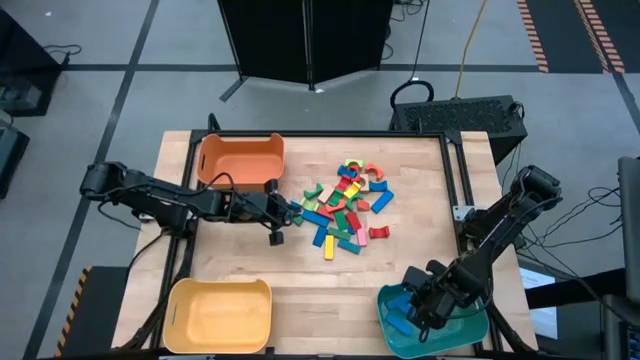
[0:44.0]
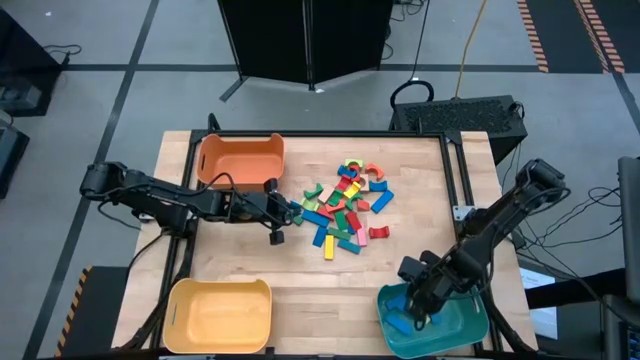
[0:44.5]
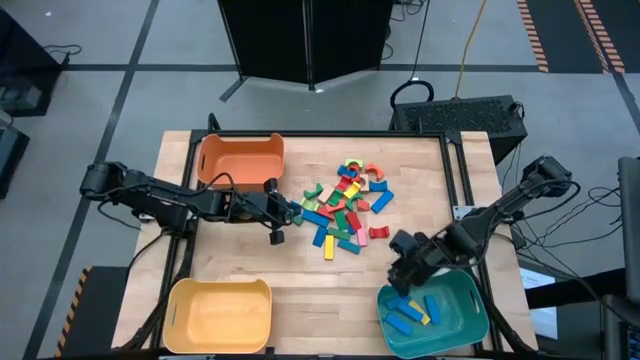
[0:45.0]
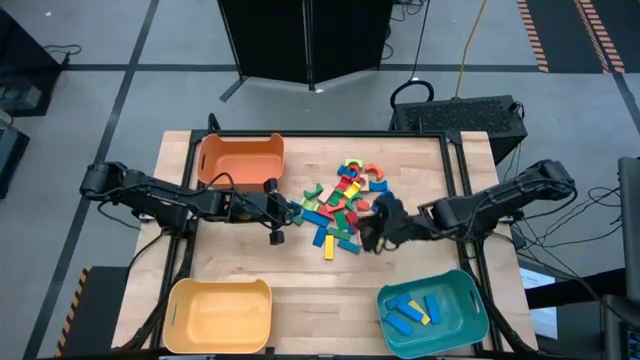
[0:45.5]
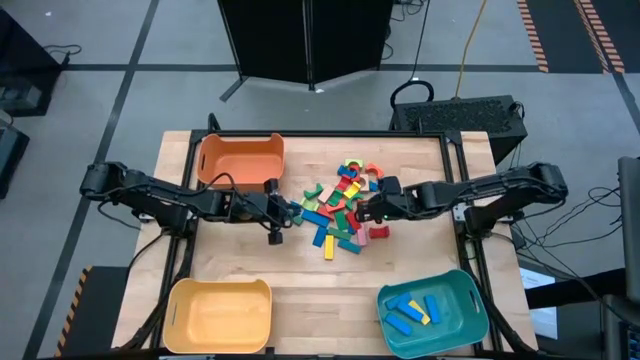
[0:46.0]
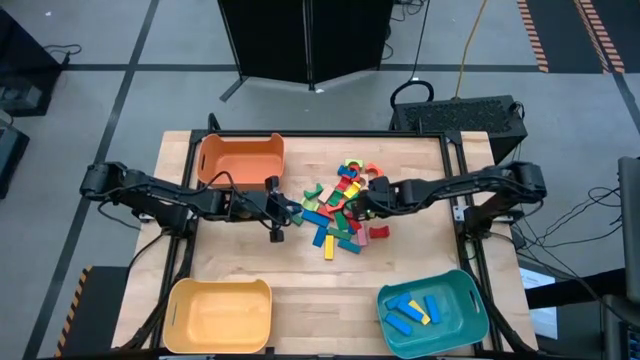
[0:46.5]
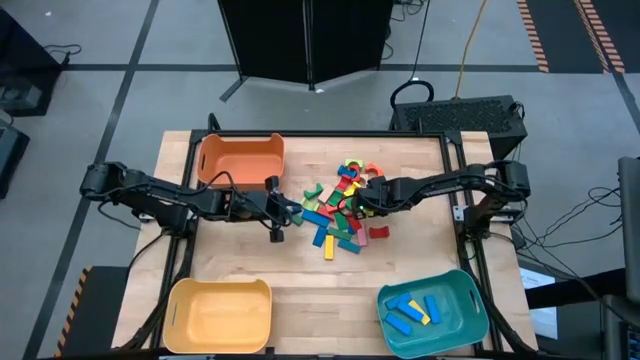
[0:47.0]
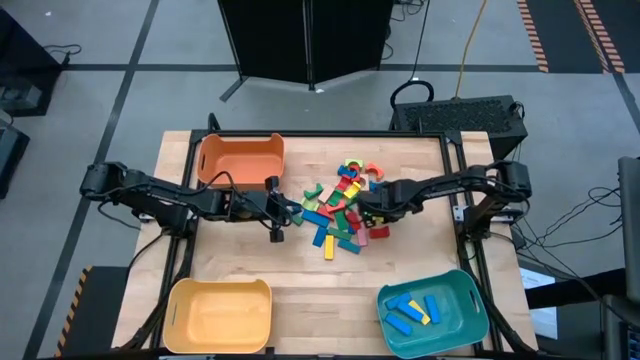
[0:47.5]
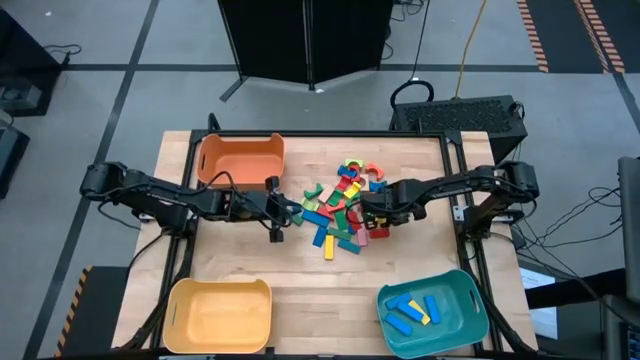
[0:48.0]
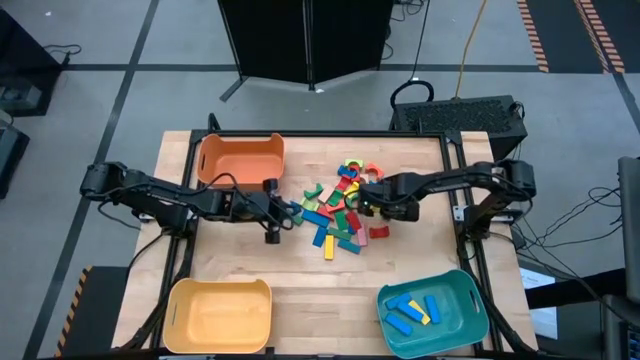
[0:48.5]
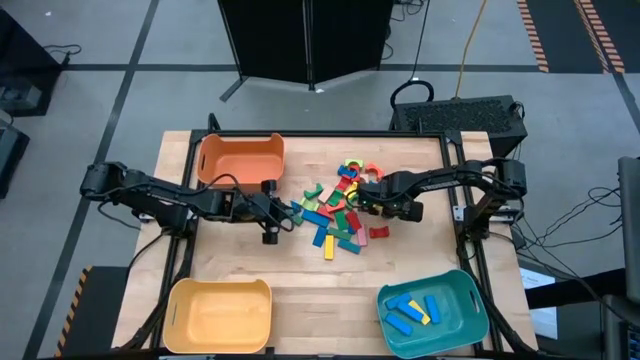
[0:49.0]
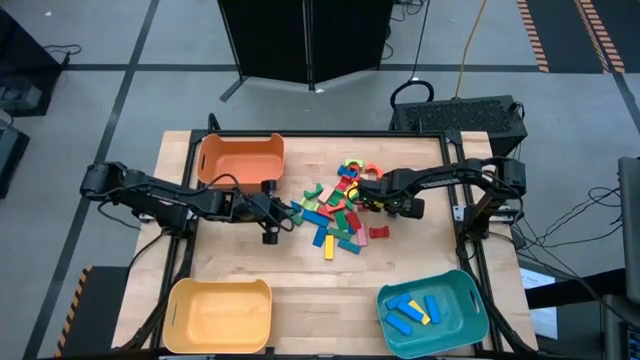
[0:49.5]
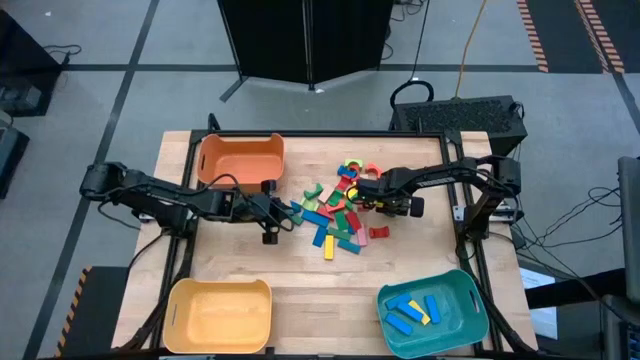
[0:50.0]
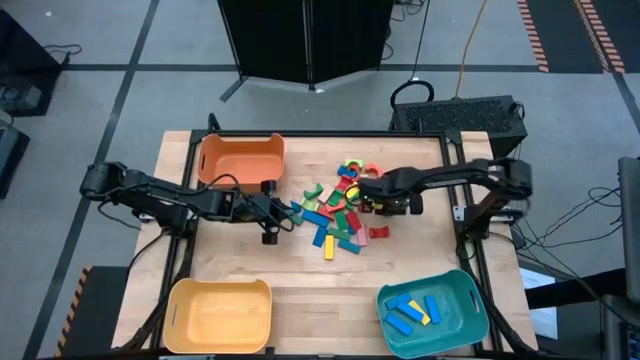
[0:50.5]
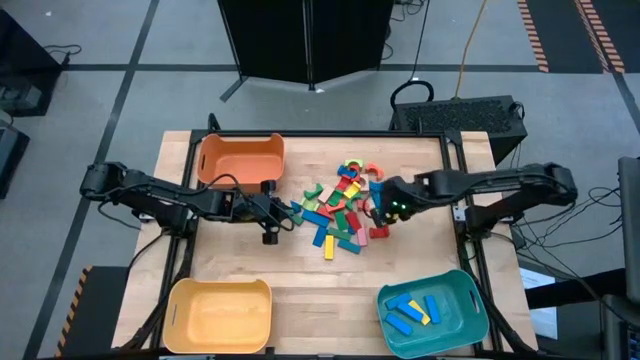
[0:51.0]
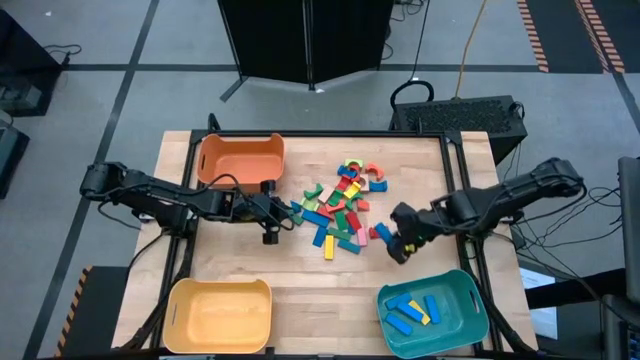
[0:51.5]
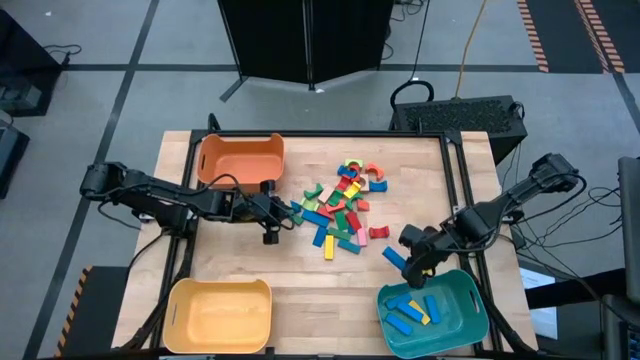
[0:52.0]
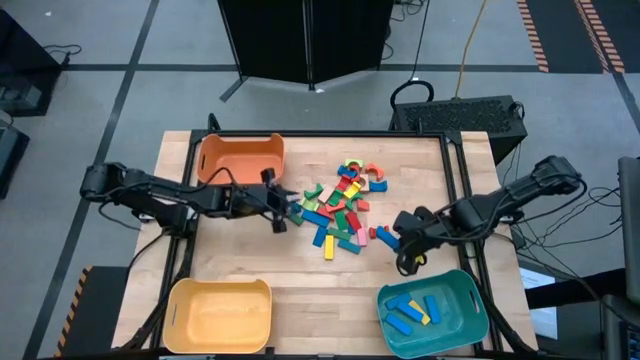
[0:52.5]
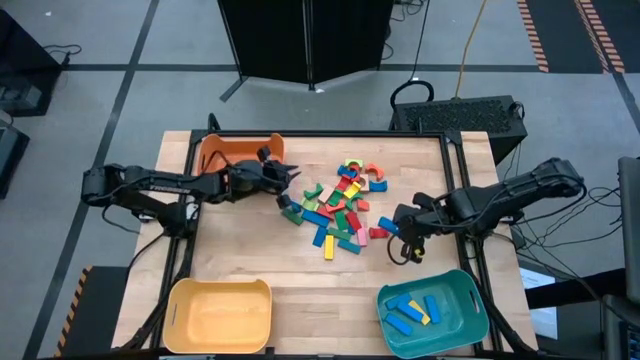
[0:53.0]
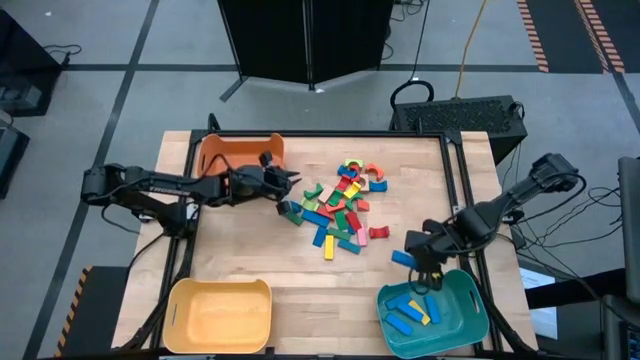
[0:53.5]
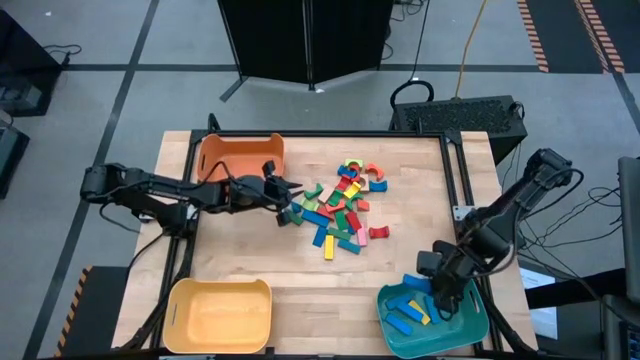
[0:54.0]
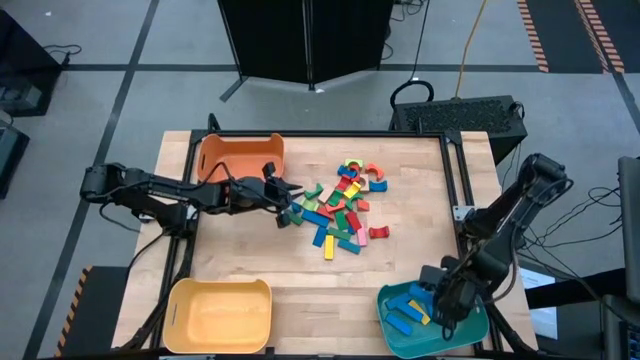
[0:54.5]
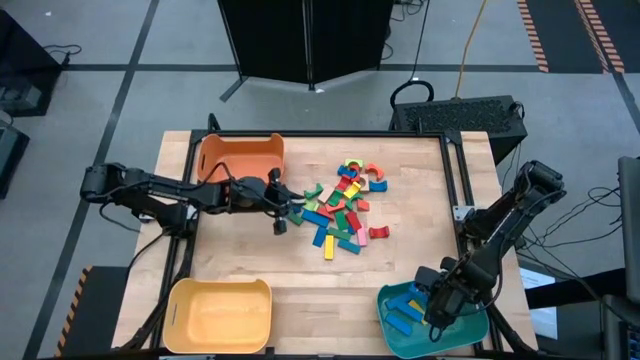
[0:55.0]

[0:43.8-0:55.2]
Task: Sort blocks by size
Put the blue rectangular block into the blue bin

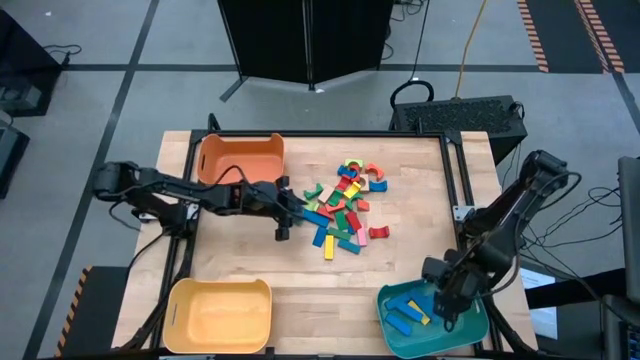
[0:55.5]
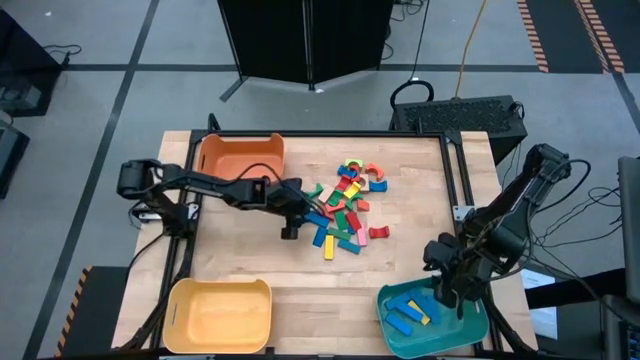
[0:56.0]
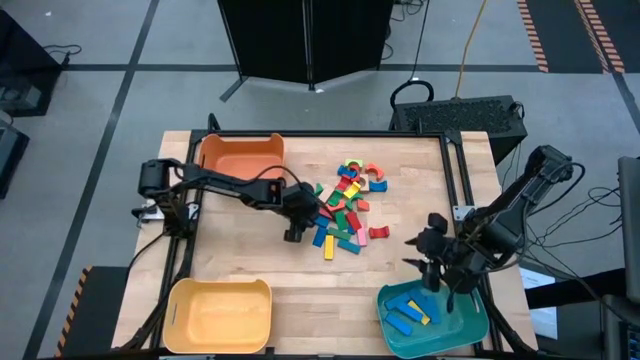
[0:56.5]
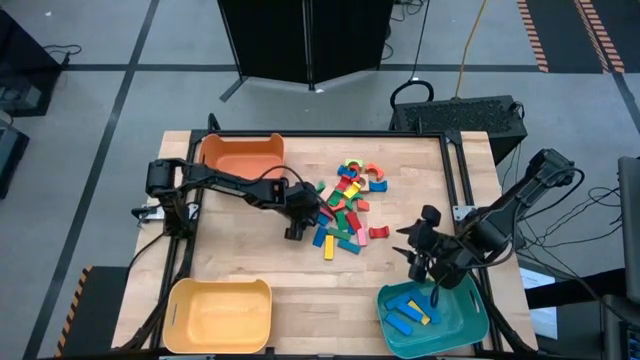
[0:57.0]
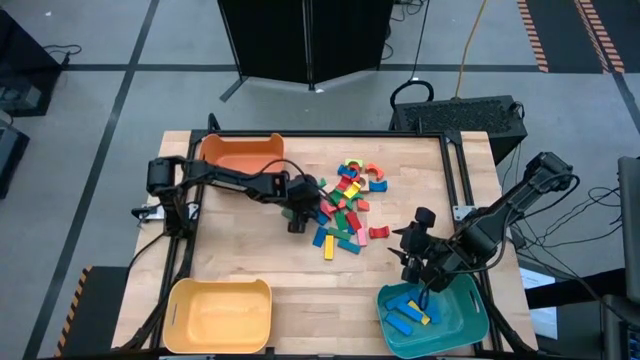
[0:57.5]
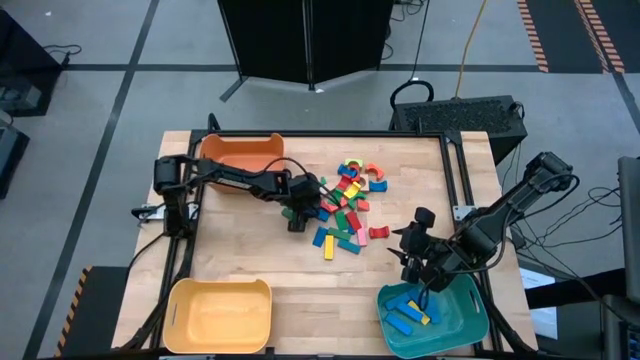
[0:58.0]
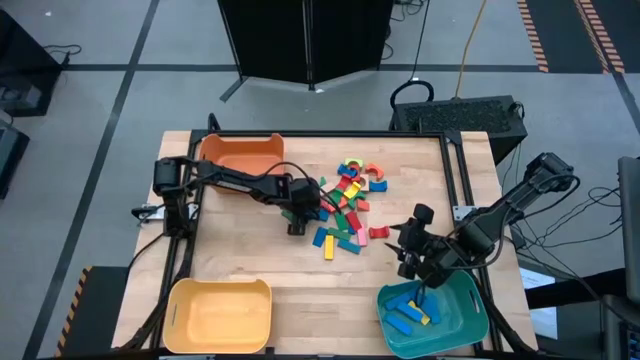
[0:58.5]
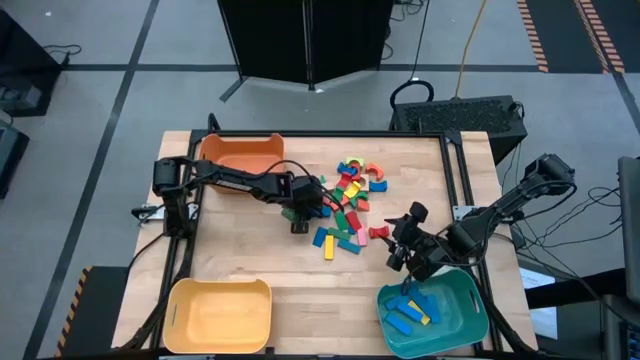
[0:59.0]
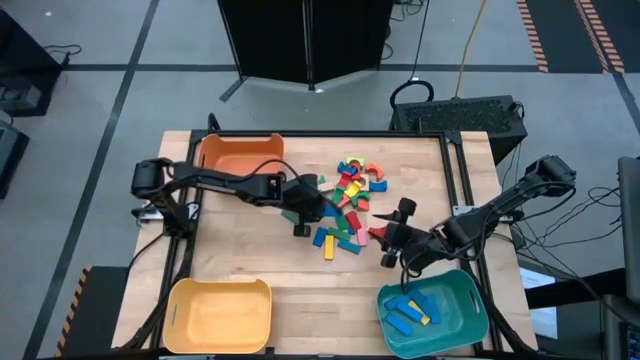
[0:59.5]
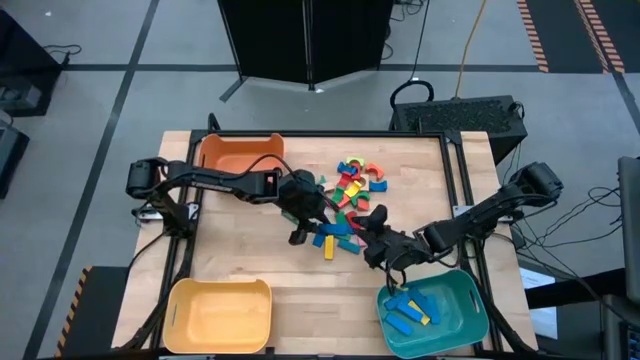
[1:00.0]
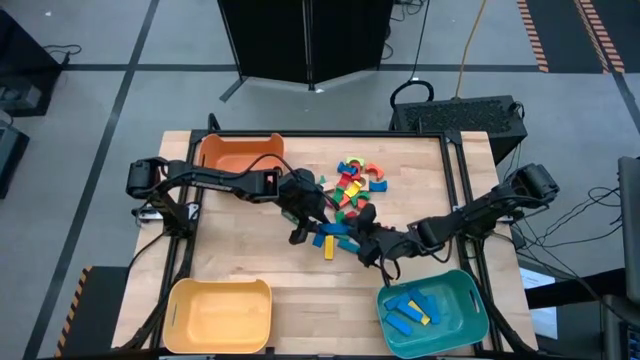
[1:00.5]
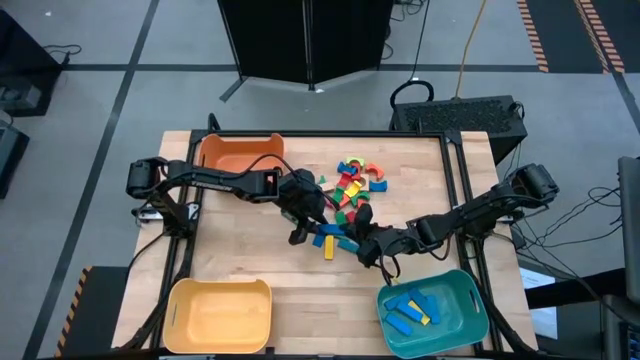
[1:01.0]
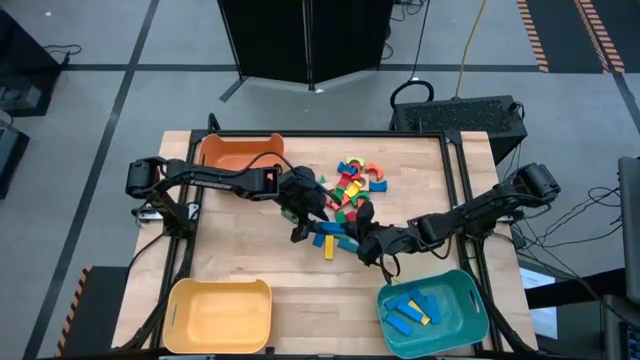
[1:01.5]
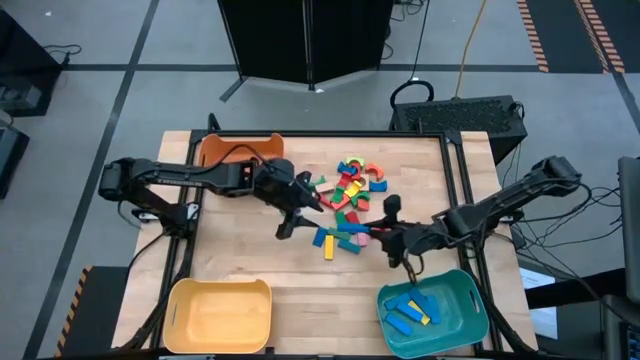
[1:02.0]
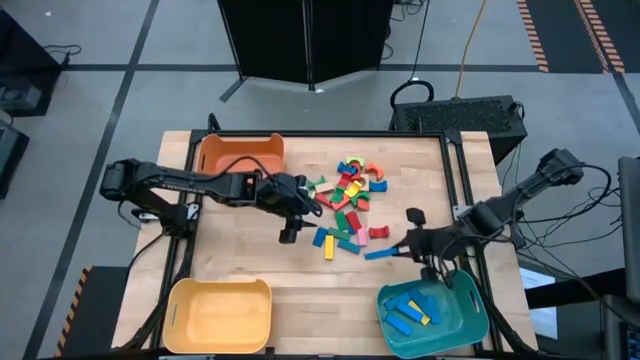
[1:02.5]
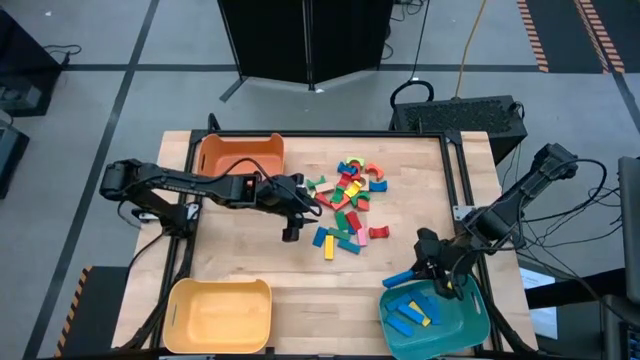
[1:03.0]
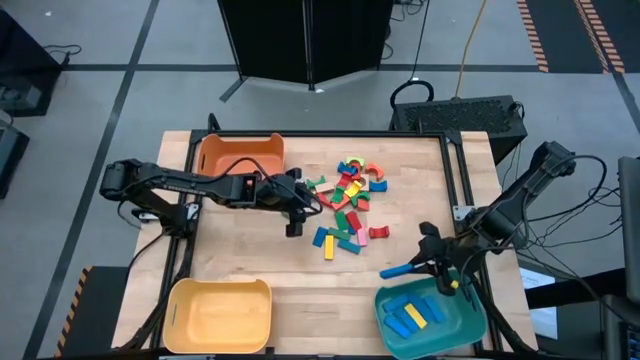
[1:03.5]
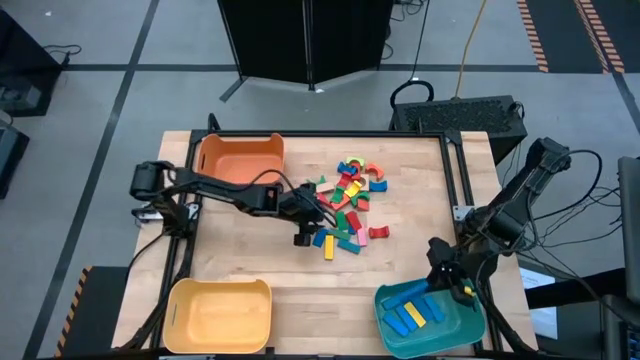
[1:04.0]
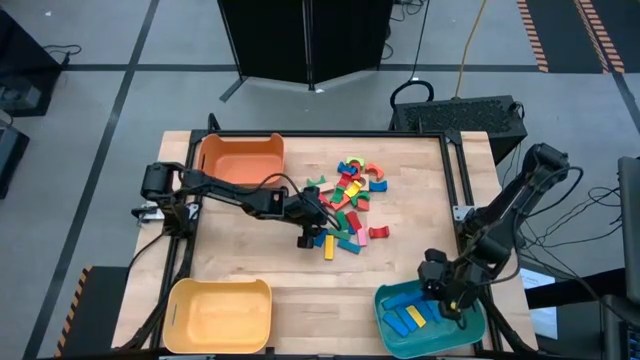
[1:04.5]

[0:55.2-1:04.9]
Put the blue rectangular block into the blue bin

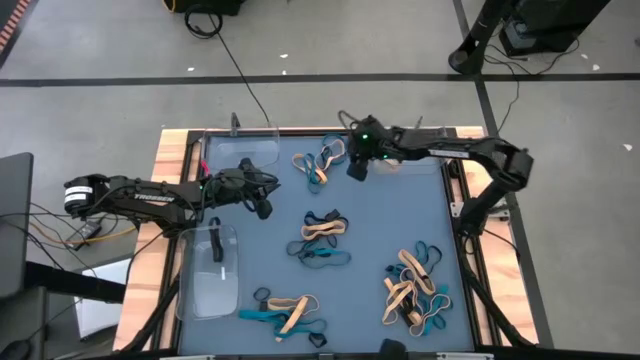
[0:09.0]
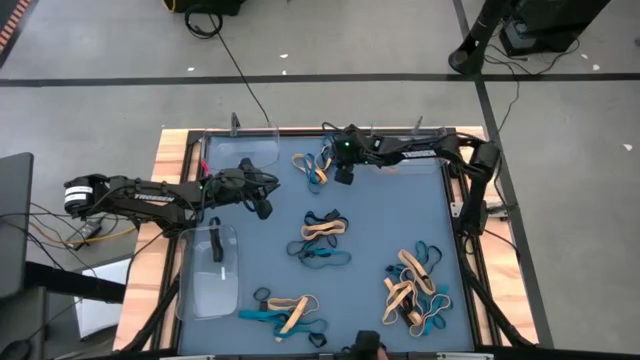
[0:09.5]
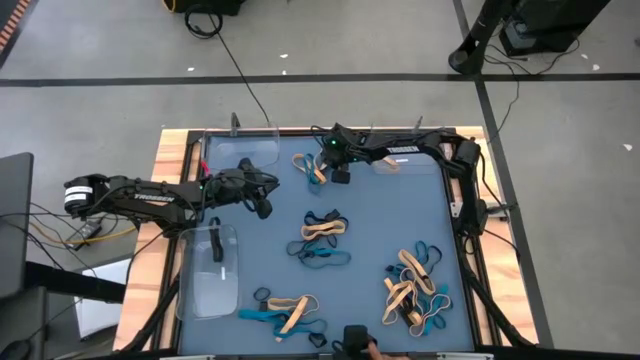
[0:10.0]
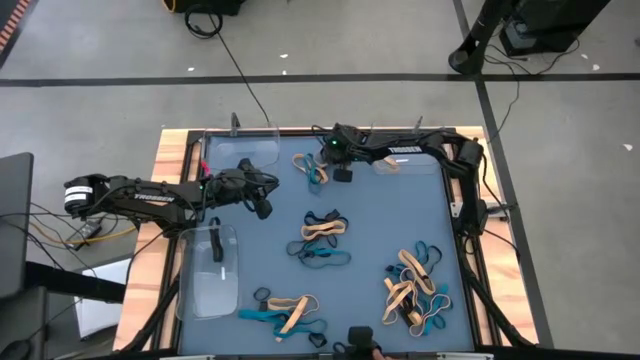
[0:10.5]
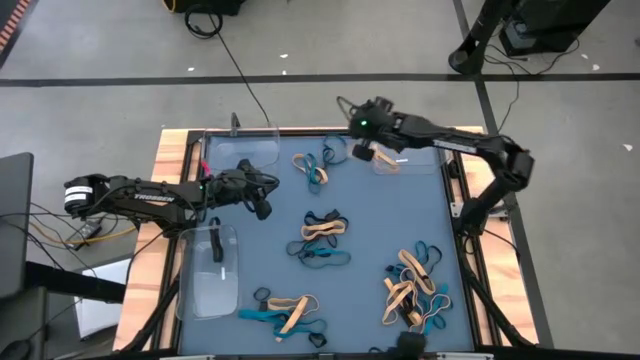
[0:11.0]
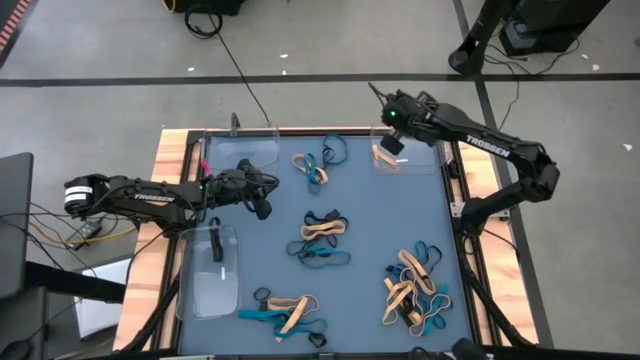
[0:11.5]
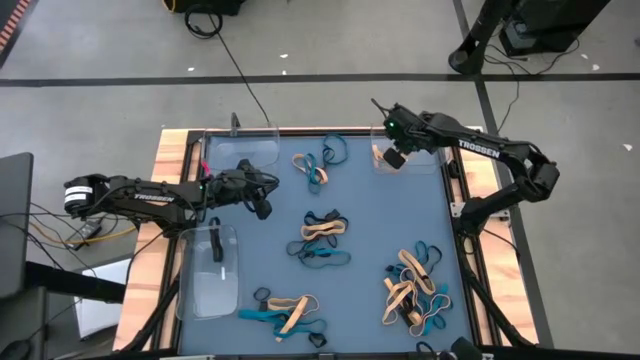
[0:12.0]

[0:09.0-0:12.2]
Task: Sort rubber bands into baskets
Put the yellow rubber band into the top right transparent bin
